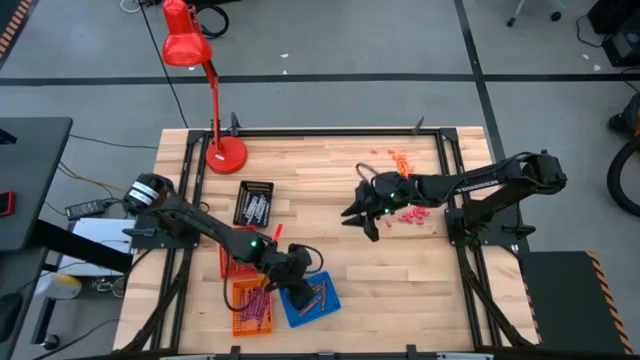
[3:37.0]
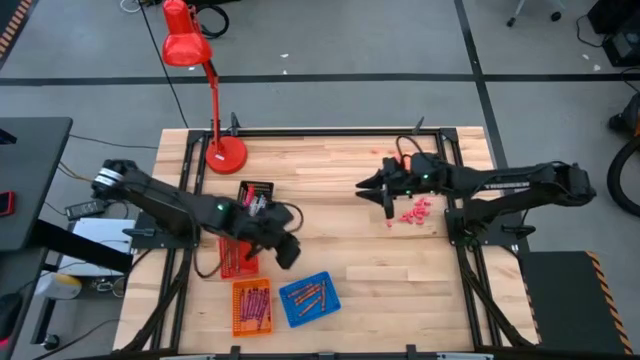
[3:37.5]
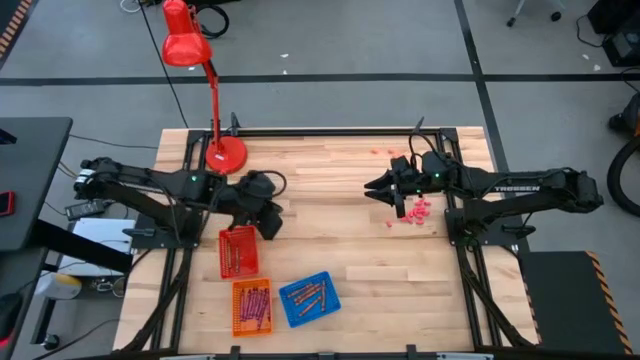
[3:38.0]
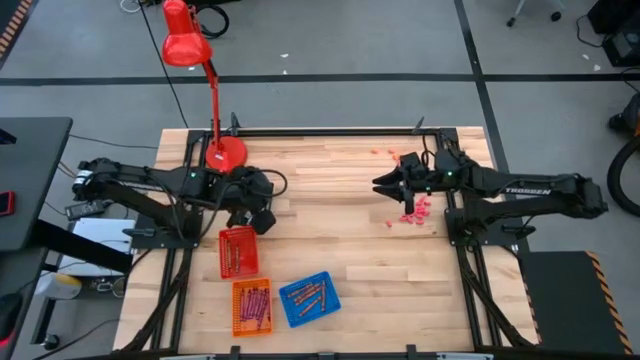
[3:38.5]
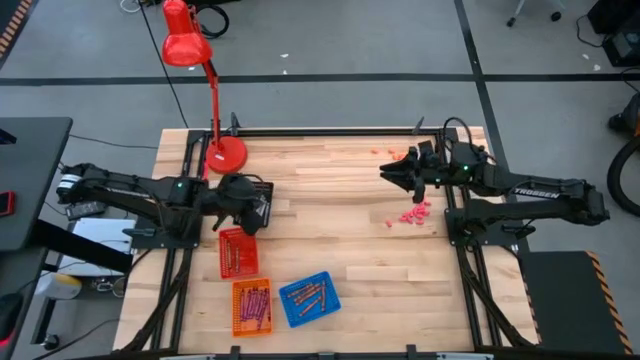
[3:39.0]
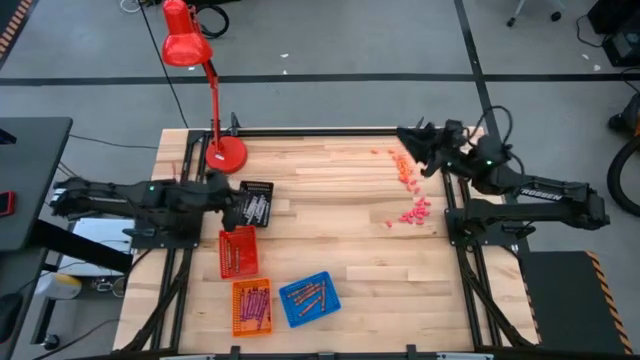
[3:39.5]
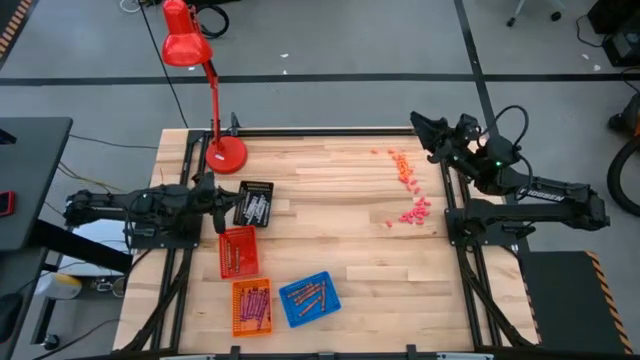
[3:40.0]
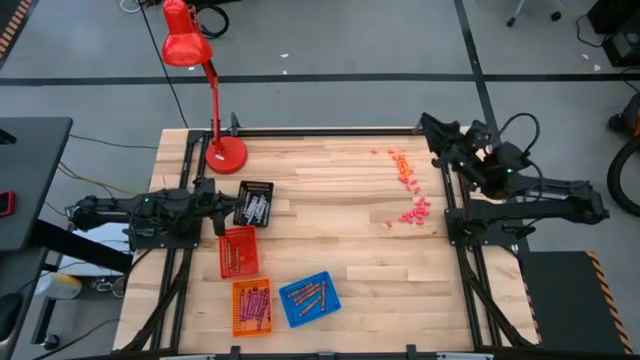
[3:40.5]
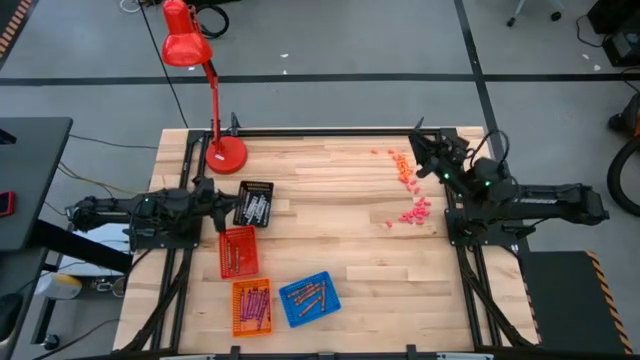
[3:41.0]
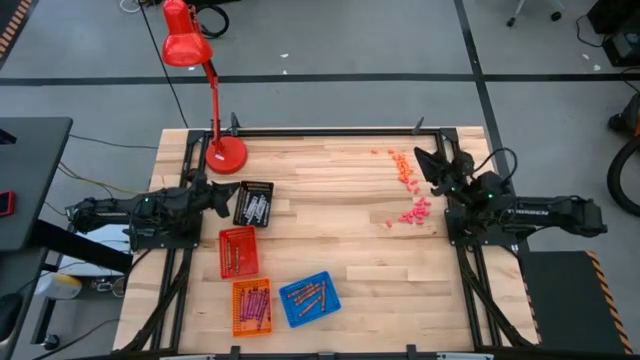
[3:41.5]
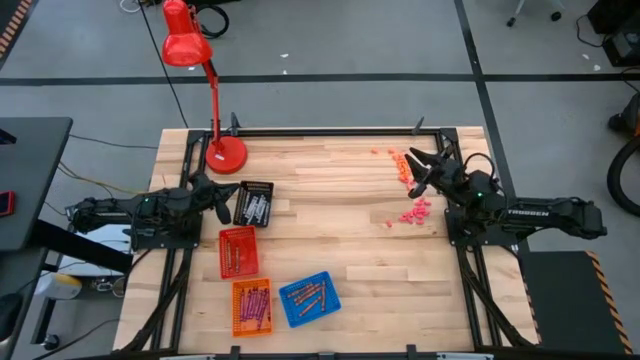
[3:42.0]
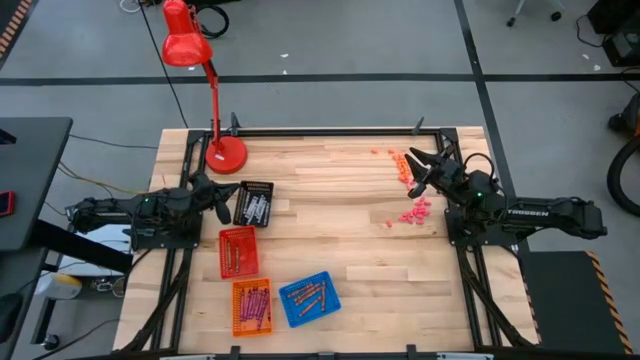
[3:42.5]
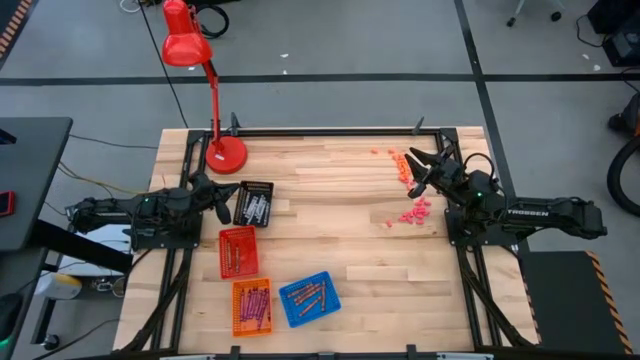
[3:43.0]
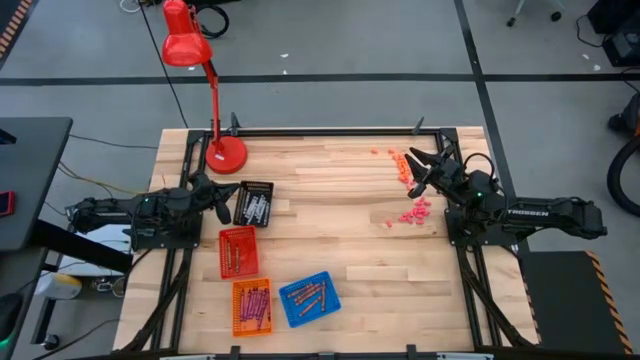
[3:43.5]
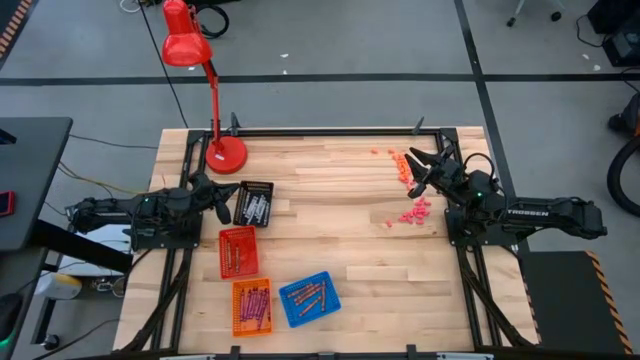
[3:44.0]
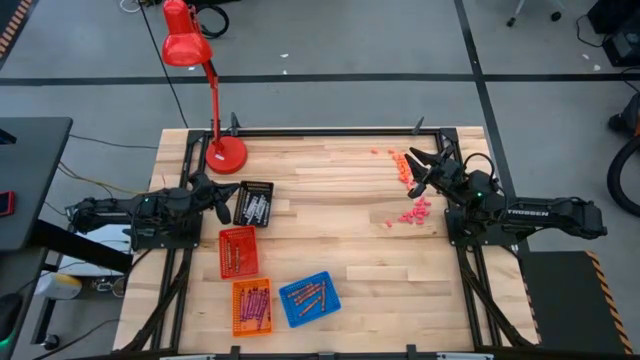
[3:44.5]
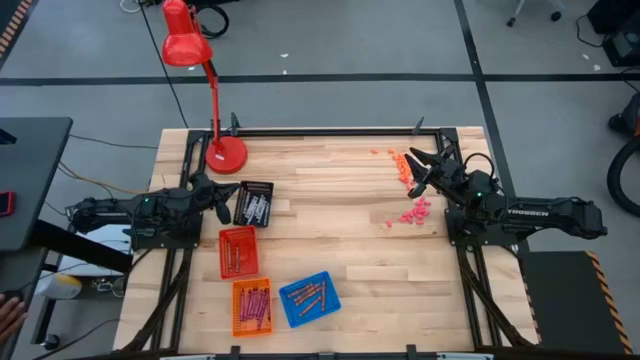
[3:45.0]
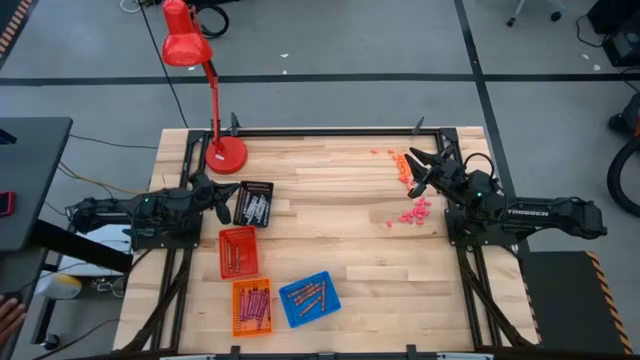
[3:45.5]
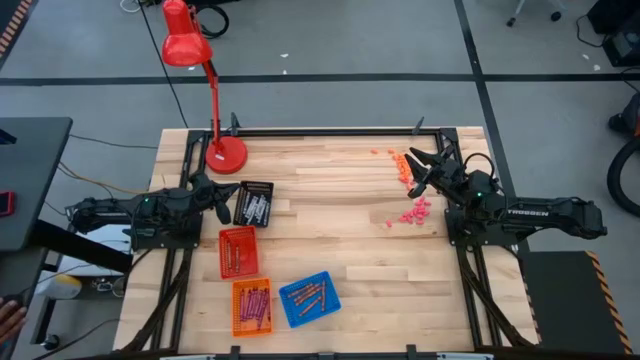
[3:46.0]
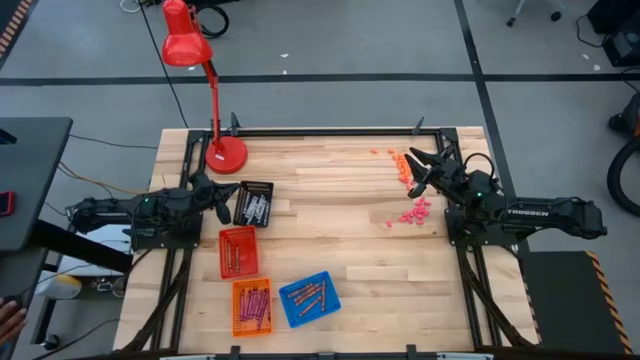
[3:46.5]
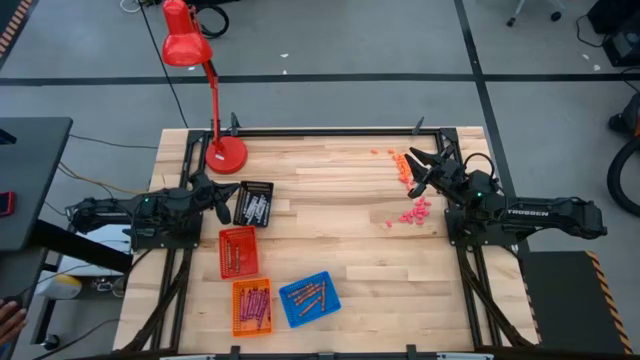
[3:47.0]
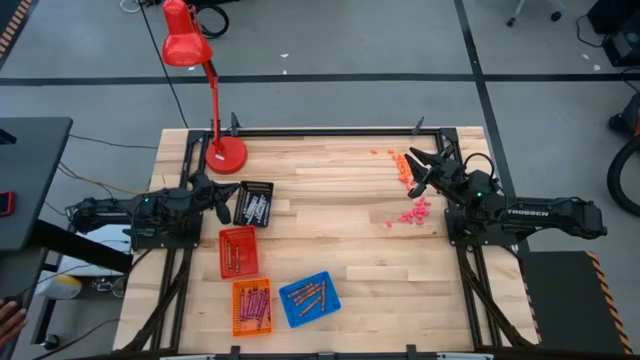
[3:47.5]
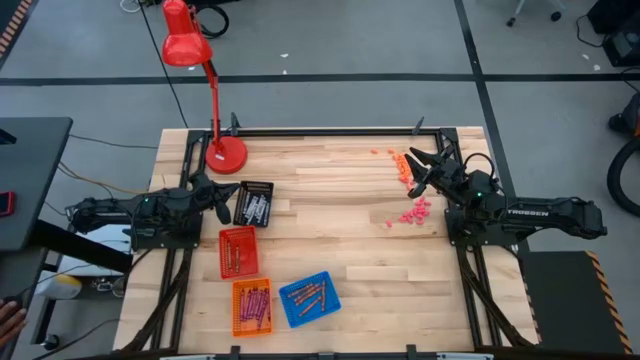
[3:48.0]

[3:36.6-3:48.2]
Task: Sort crayons
Return to Home Position

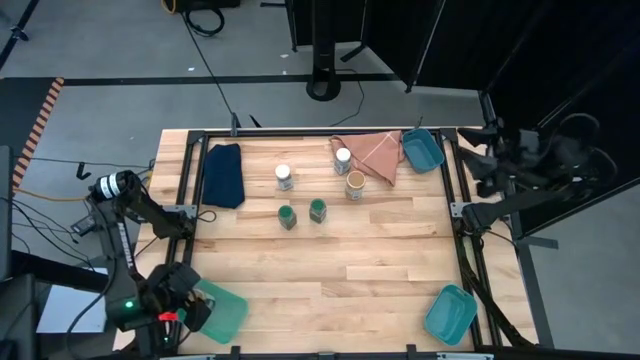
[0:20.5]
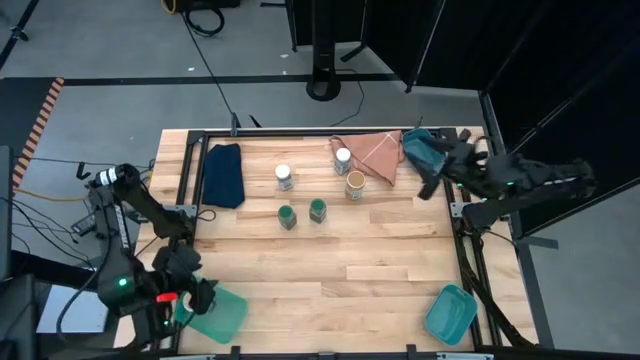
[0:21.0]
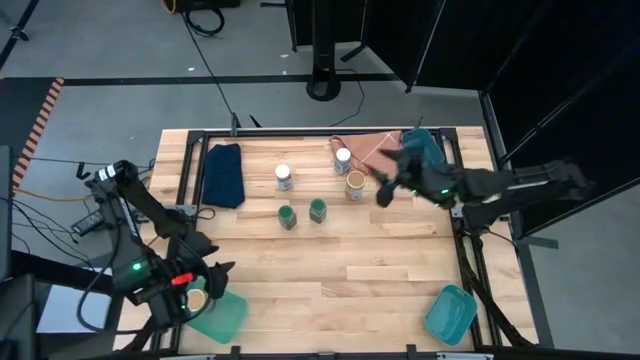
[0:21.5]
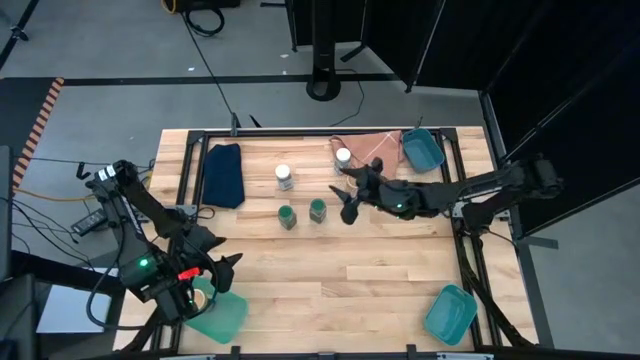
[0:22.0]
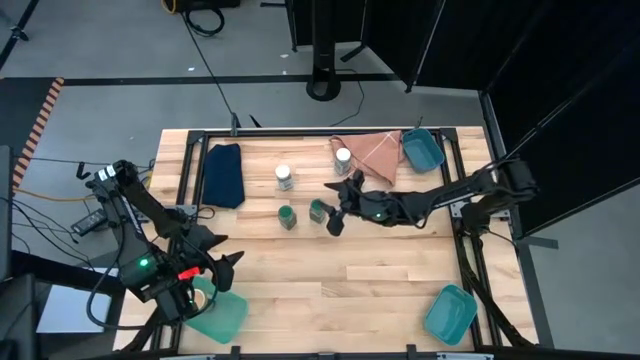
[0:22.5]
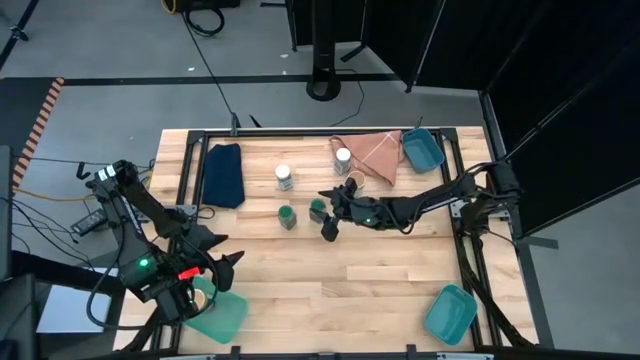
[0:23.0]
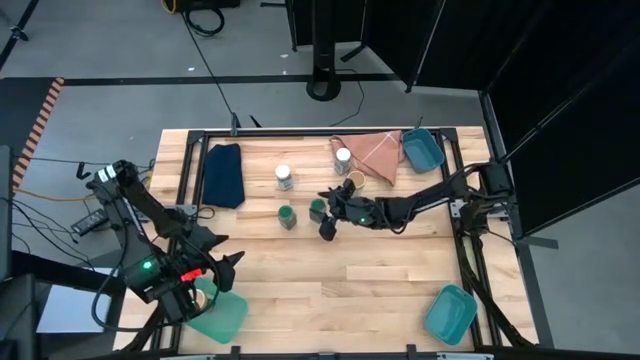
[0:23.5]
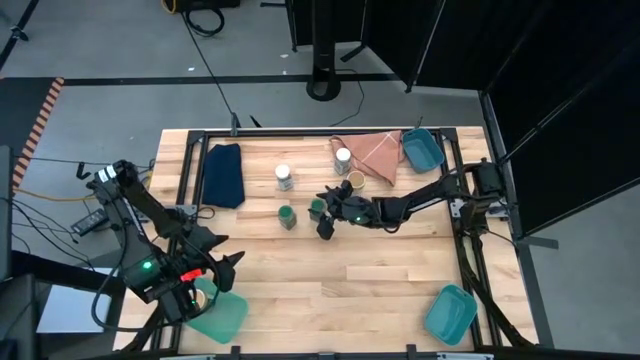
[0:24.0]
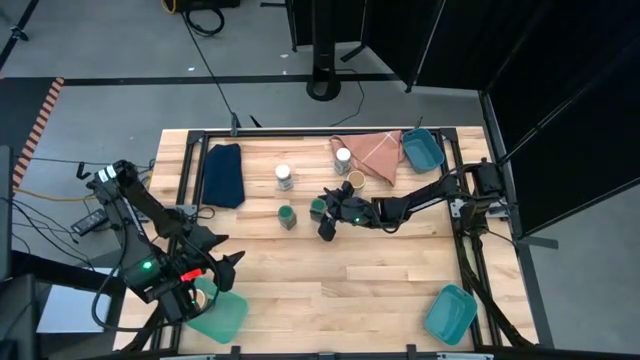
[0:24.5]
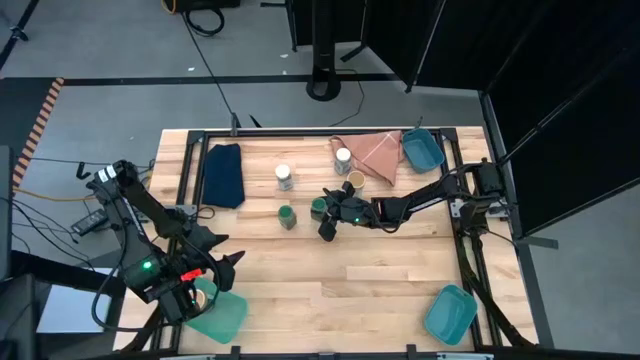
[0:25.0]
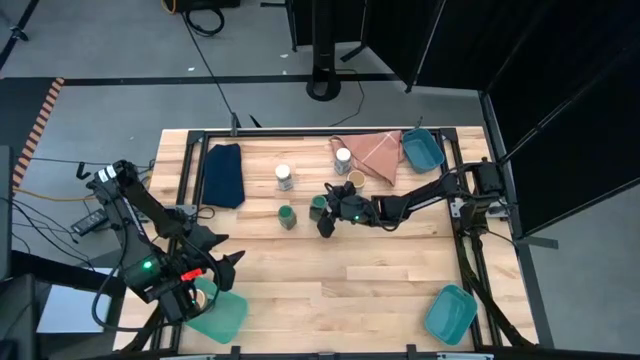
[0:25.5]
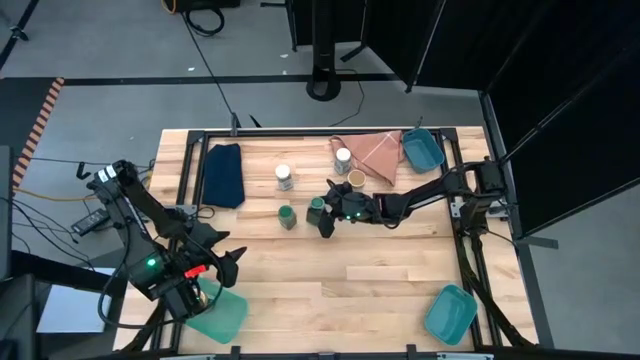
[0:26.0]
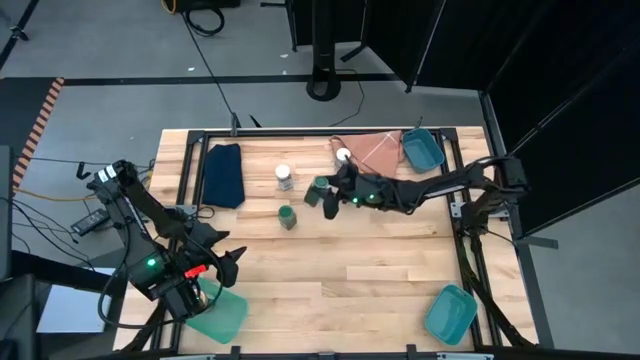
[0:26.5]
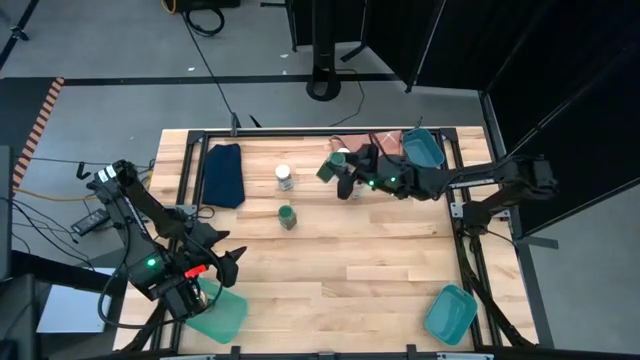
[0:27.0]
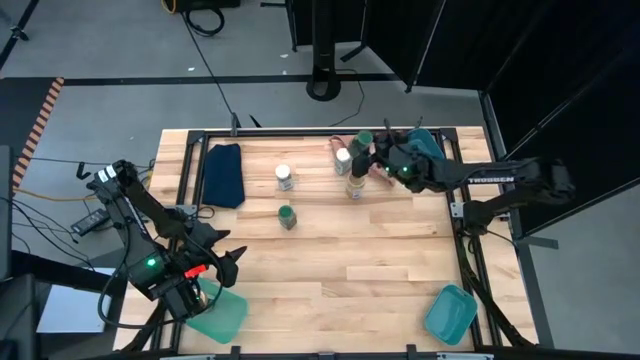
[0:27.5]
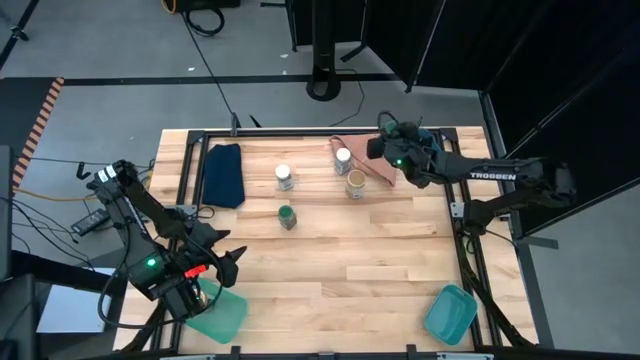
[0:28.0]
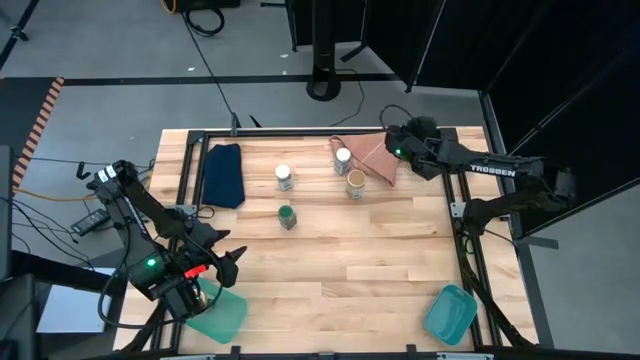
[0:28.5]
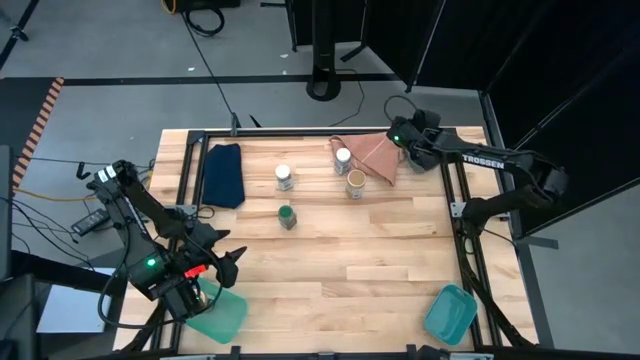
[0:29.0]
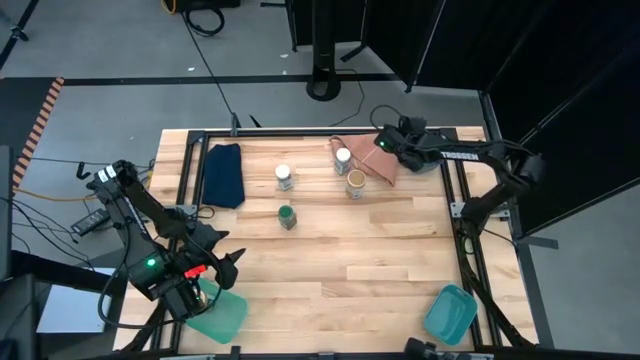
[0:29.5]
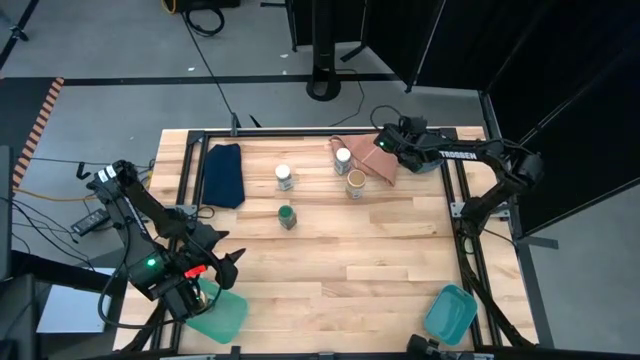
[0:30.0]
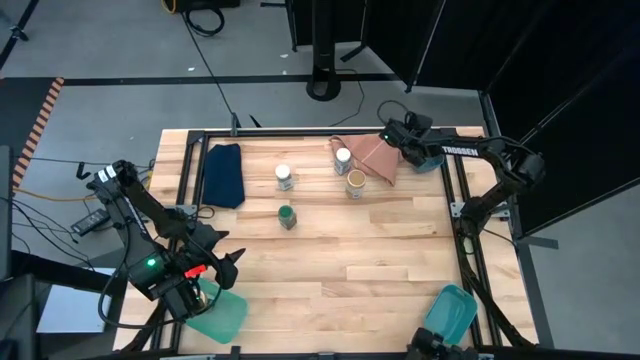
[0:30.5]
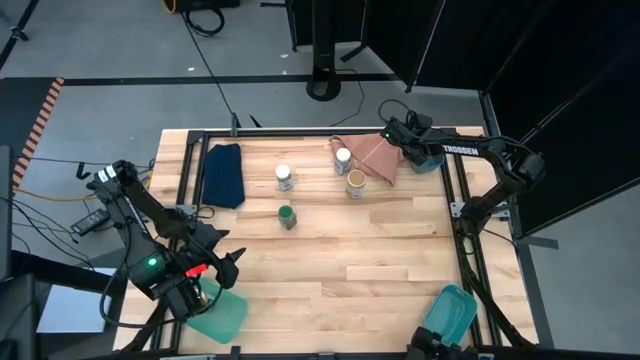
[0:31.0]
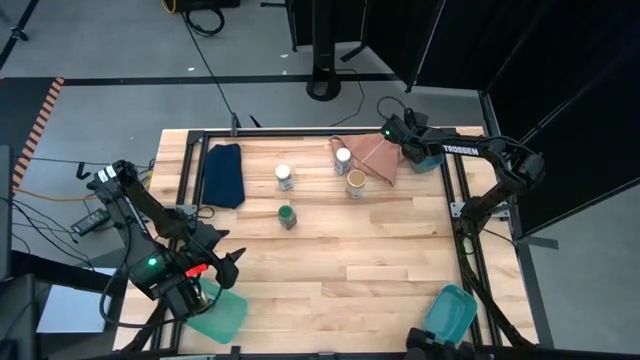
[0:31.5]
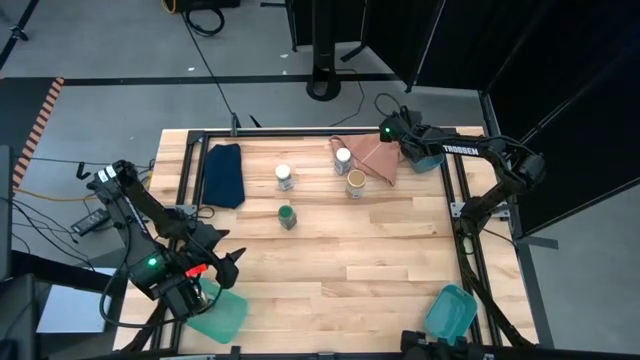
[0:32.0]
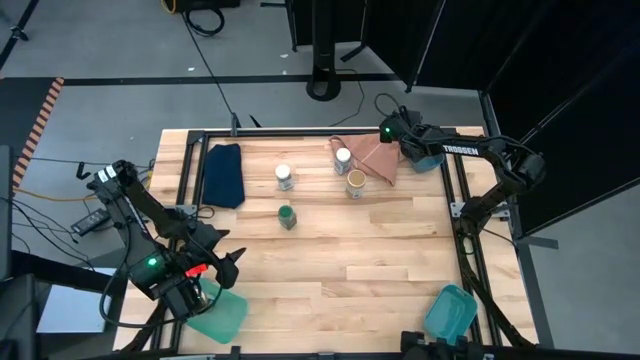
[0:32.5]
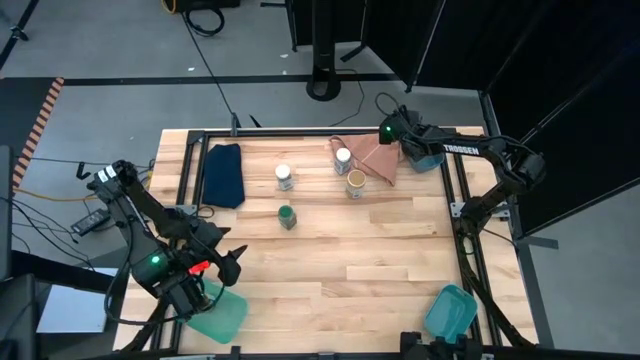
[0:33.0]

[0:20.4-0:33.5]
Task: Sort spices by type
Put the right green seasoning bottle into the blue bin
